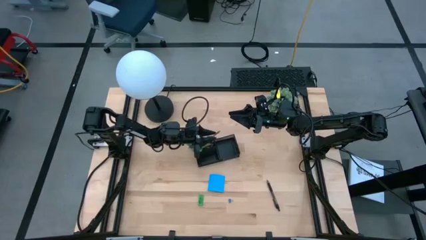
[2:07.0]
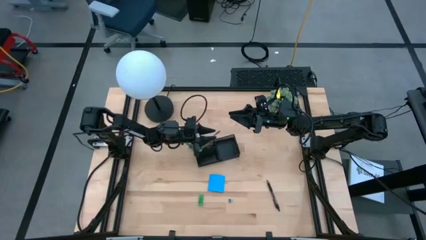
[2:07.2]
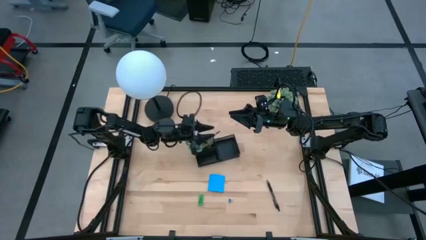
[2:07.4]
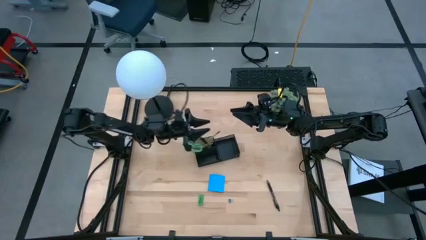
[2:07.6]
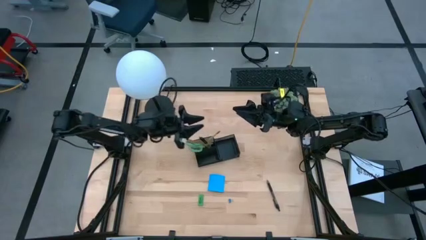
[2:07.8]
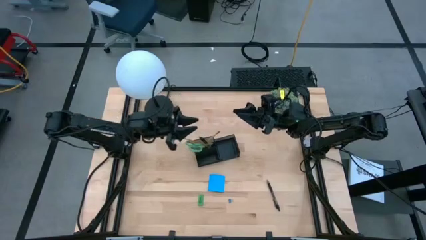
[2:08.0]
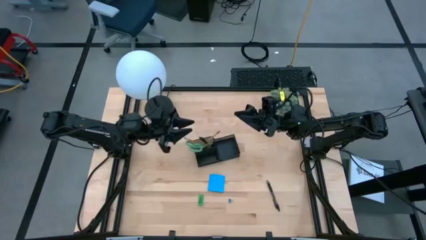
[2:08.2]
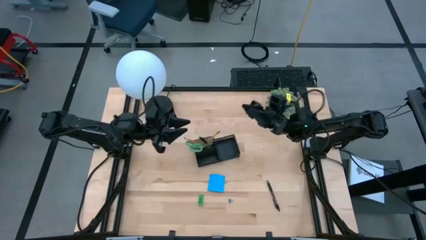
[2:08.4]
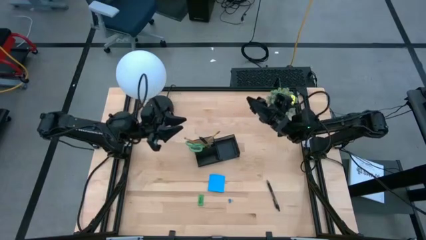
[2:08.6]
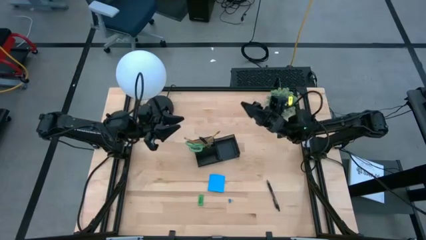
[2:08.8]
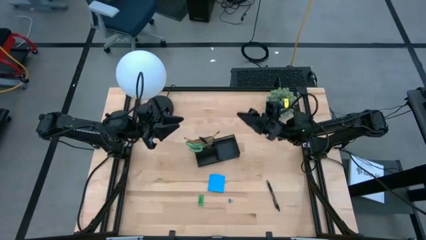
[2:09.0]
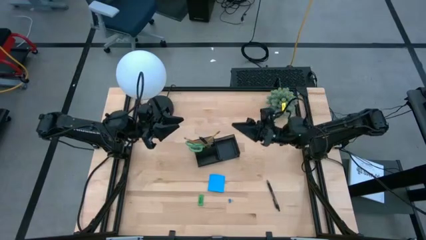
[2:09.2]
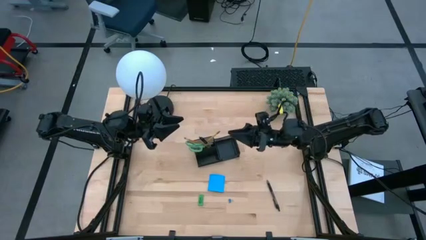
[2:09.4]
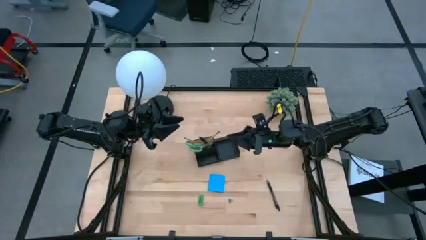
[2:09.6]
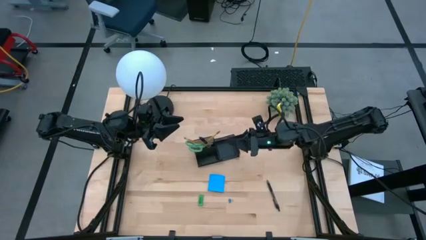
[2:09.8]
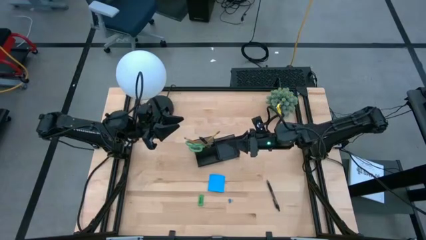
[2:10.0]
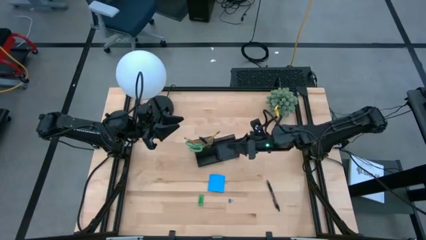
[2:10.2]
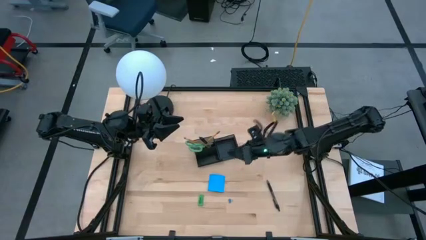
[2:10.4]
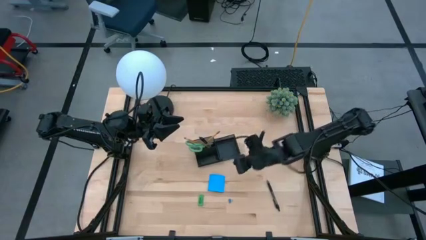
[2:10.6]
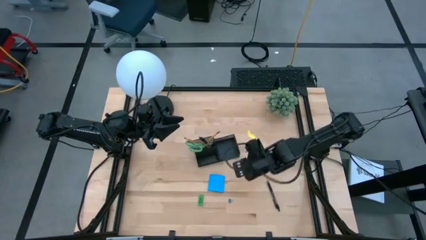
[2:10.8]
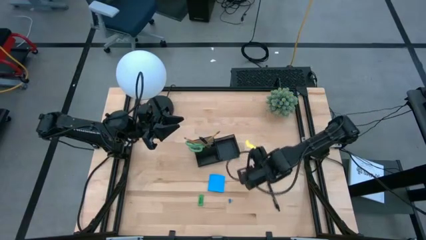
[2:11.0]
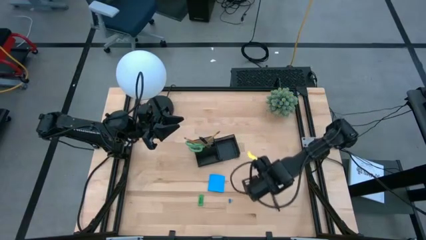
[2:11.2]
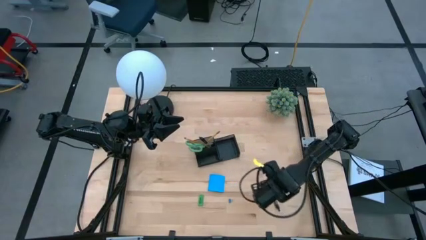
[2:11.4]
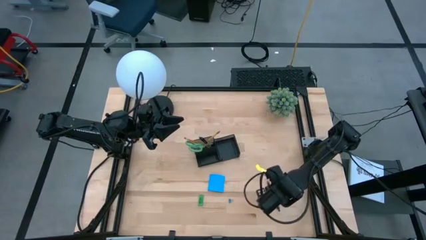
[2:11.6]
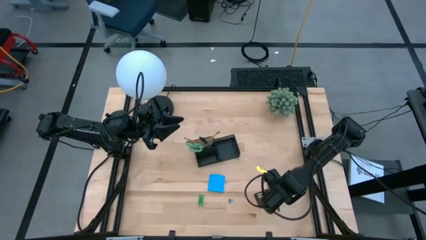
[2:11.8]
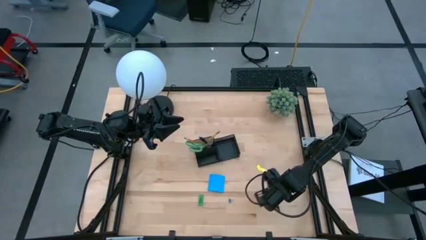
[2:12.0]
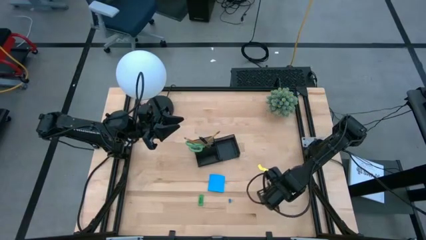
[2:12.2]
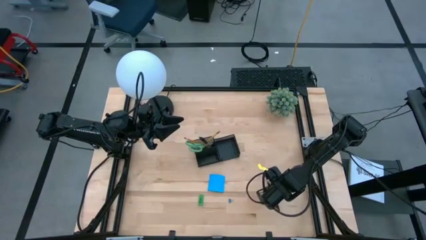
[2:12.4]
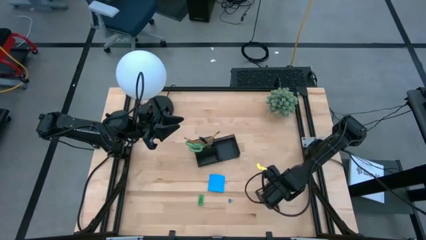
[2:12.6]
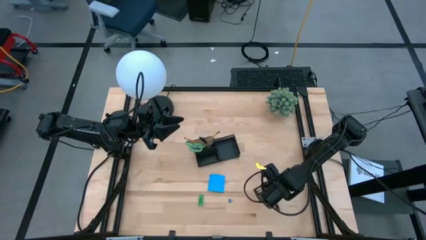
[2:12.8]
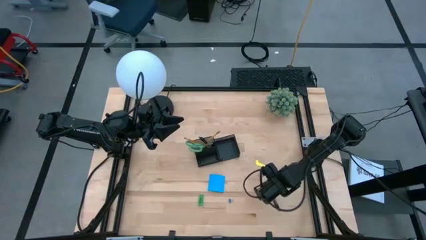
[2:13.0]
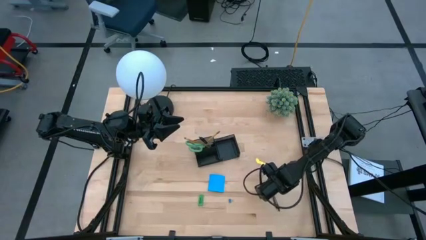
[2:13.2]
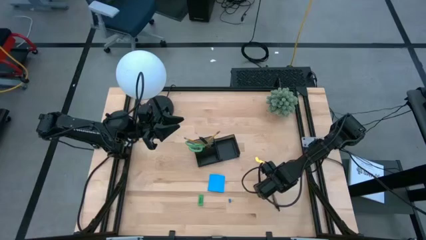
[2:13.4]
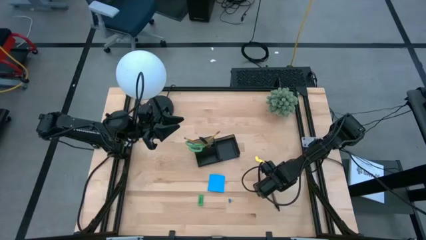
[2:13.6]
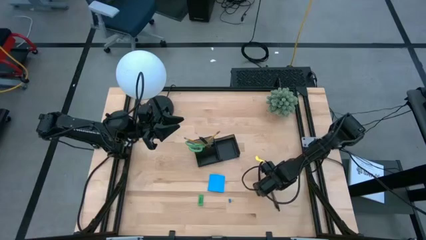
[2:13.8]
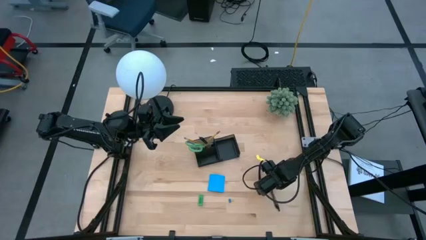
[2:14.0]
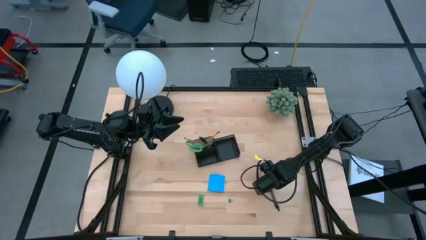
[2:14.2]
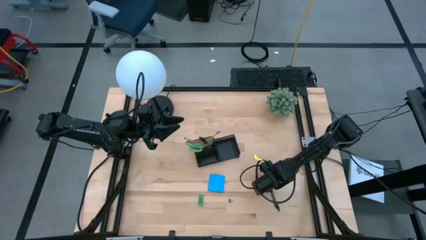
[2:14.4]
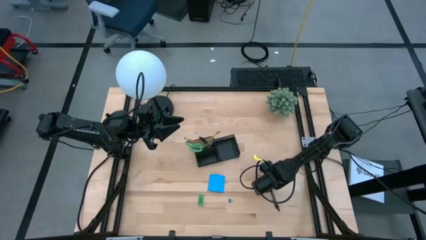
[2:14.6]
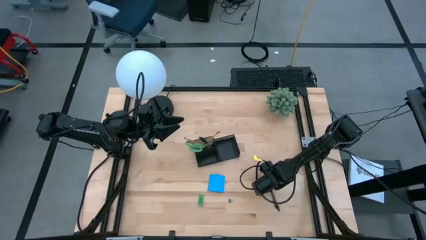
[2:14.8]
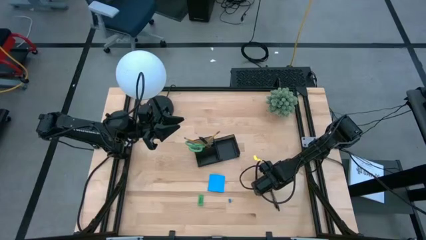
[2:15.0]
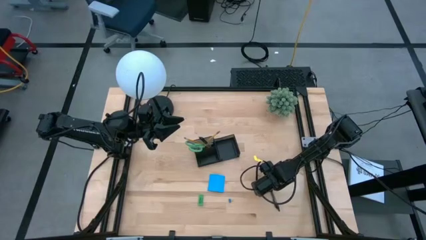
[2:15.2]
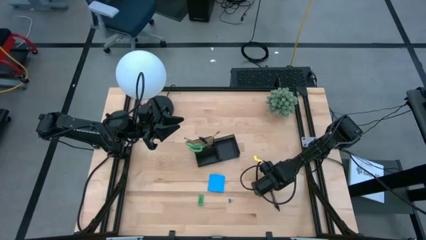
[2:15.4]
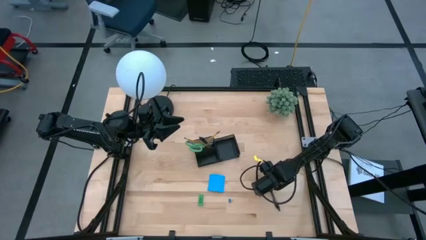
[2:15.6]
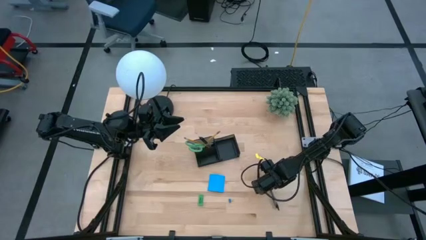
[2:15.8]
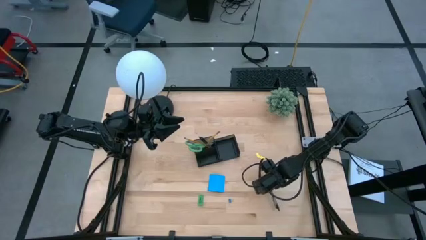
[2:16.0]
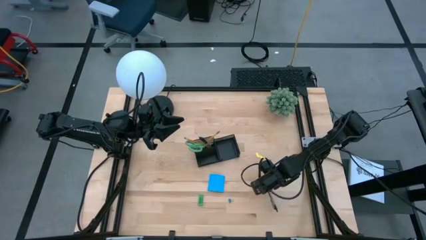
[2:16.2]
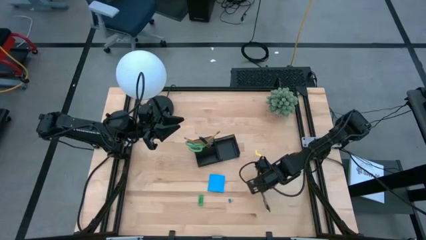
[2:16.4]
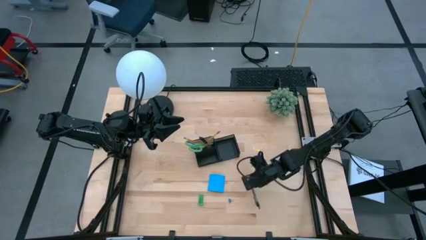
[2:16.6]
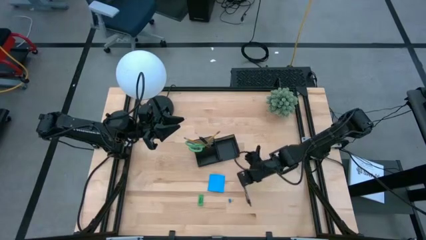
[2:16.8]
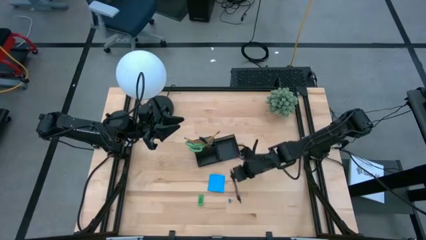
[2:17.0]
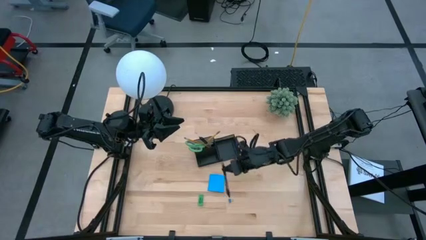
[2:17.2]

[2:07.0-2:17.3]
Task: Pick and place office supplies into organizer
Put the black pen into the black desk organizer
